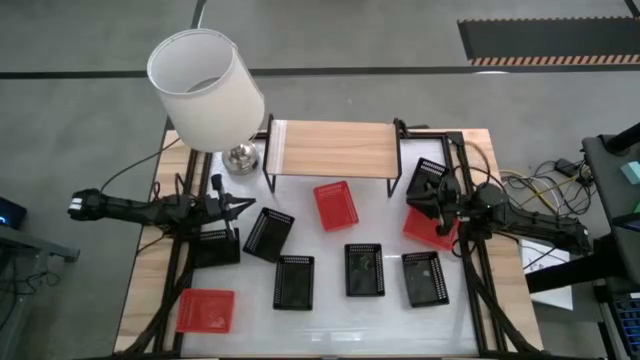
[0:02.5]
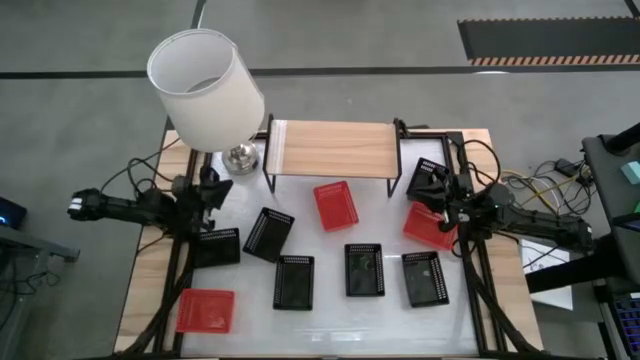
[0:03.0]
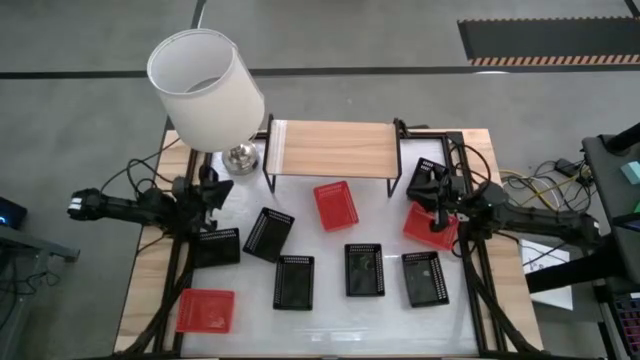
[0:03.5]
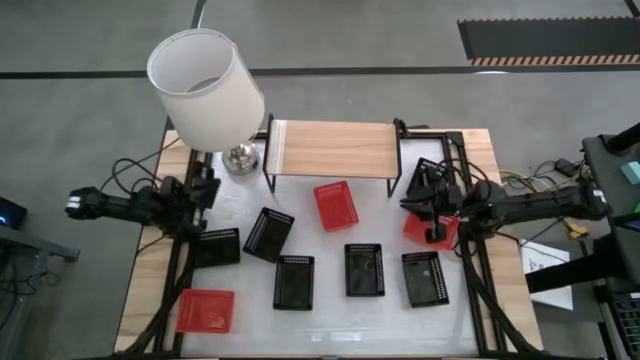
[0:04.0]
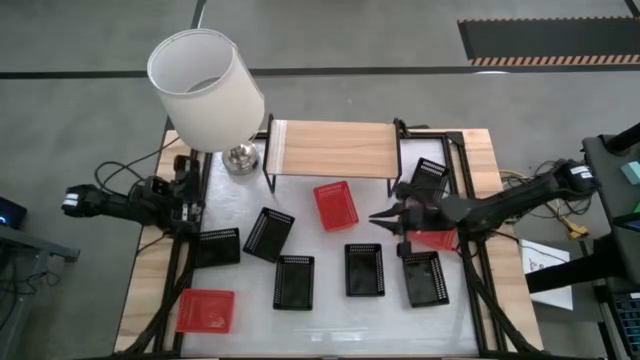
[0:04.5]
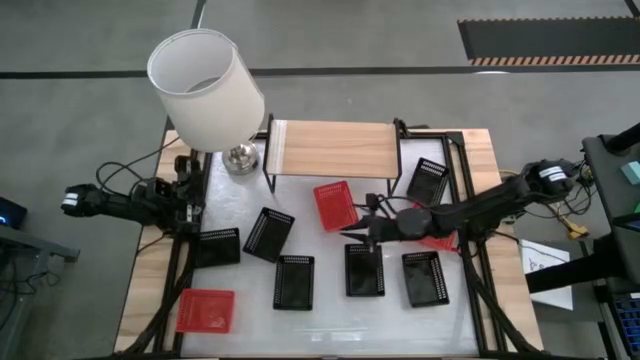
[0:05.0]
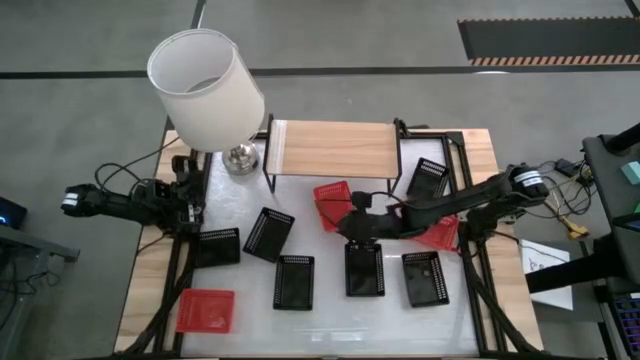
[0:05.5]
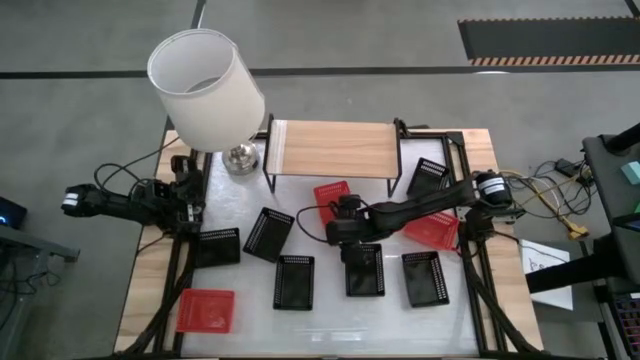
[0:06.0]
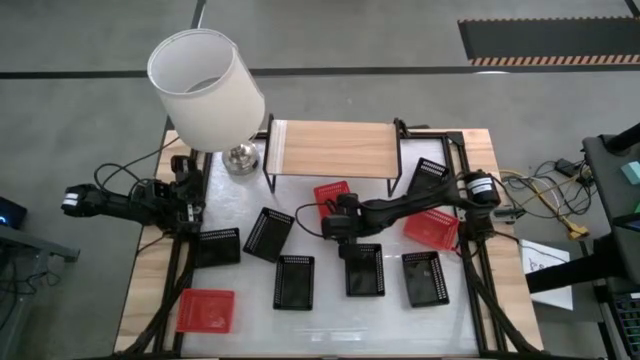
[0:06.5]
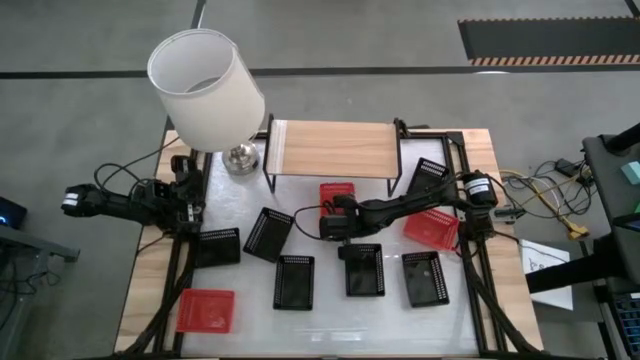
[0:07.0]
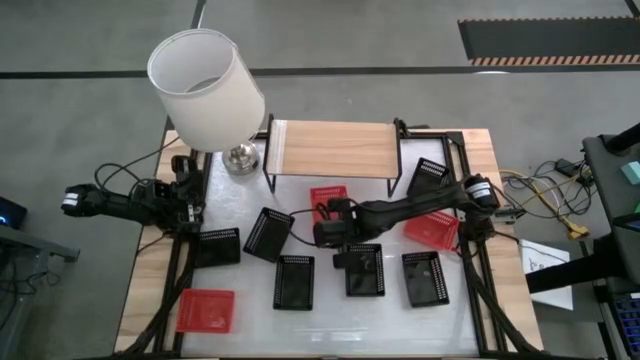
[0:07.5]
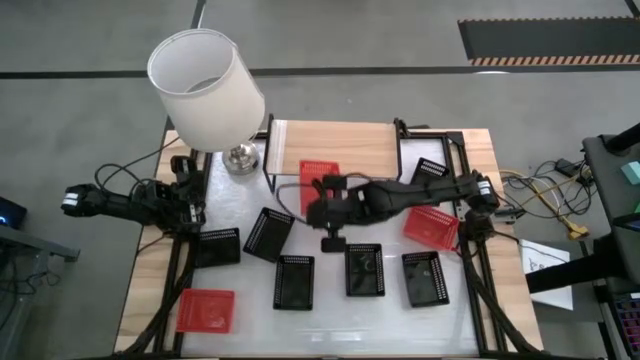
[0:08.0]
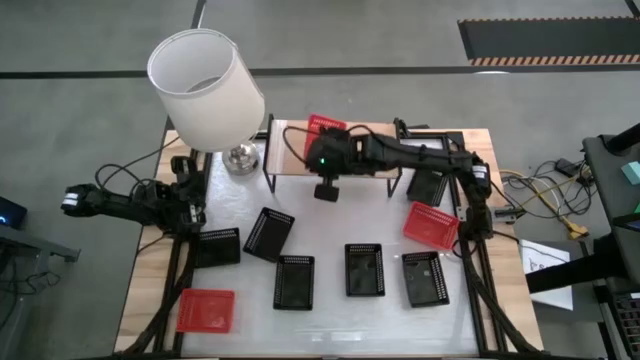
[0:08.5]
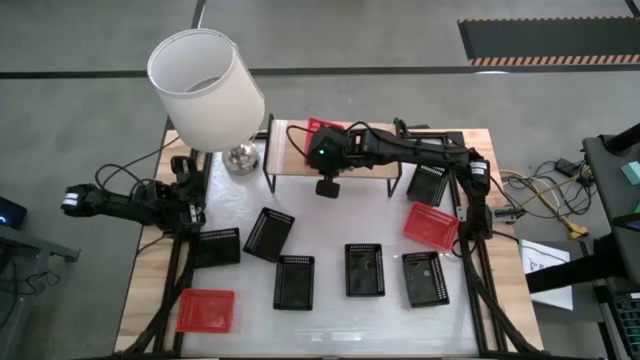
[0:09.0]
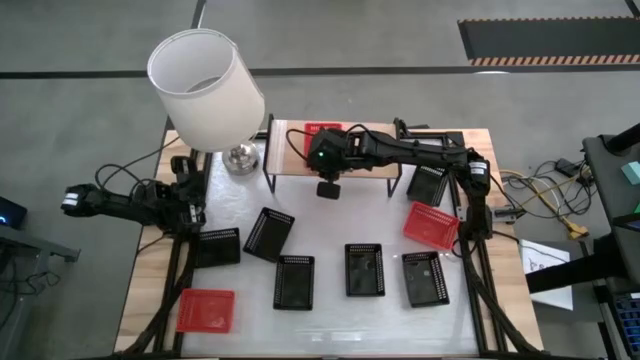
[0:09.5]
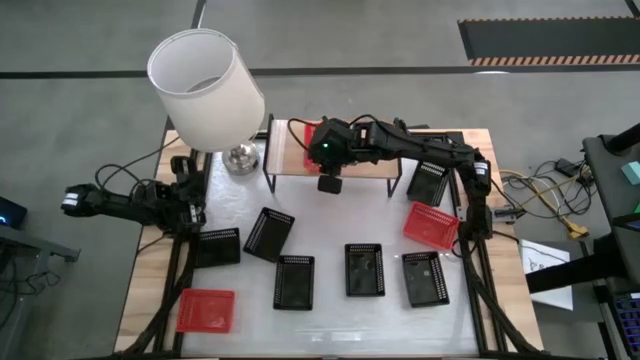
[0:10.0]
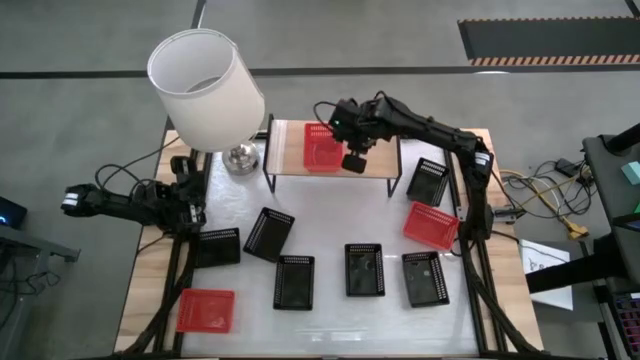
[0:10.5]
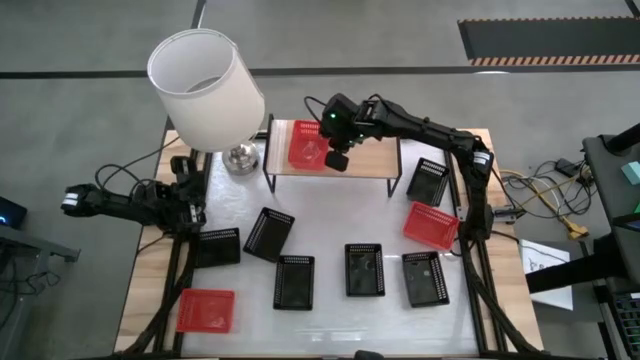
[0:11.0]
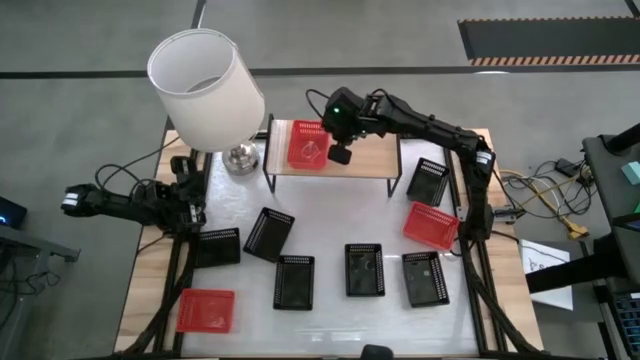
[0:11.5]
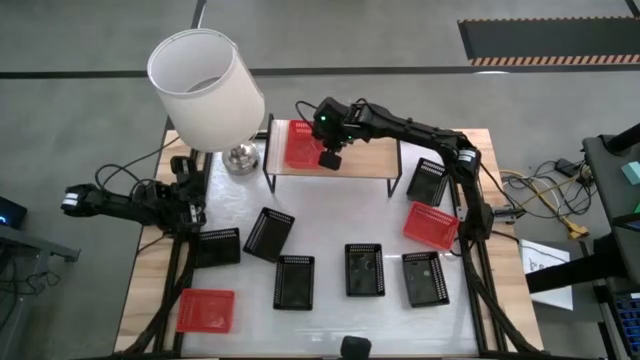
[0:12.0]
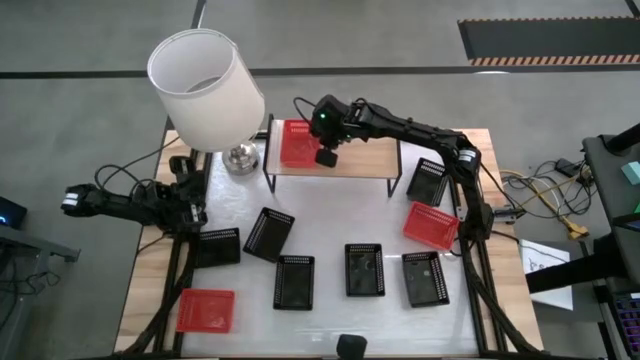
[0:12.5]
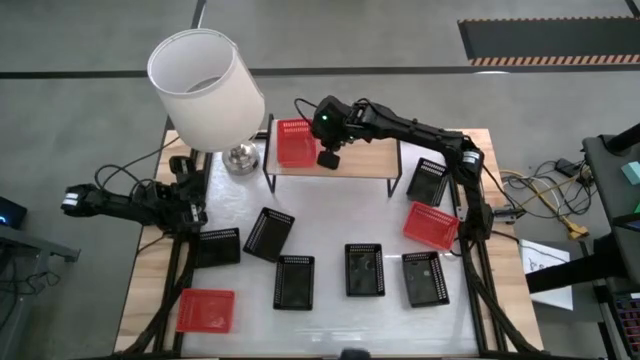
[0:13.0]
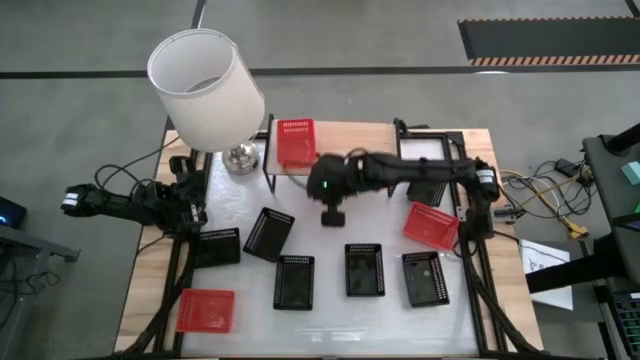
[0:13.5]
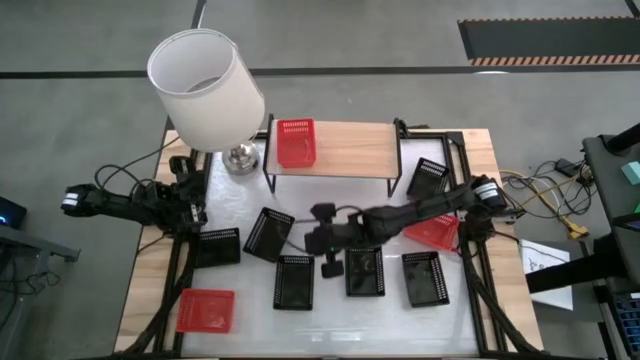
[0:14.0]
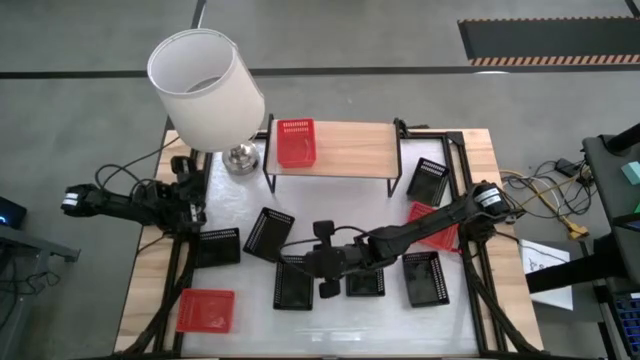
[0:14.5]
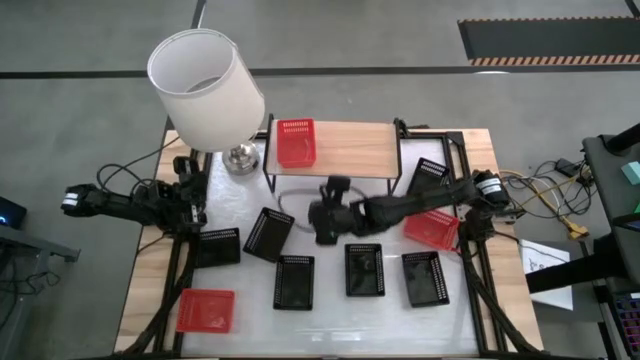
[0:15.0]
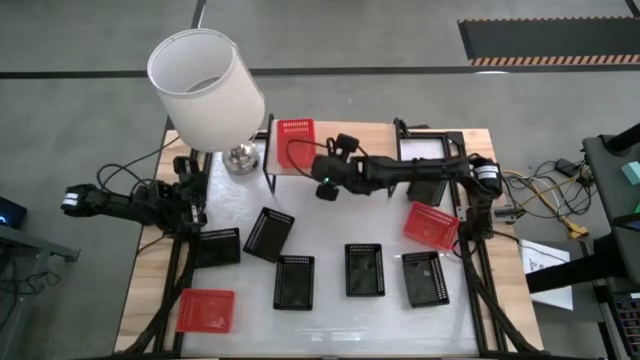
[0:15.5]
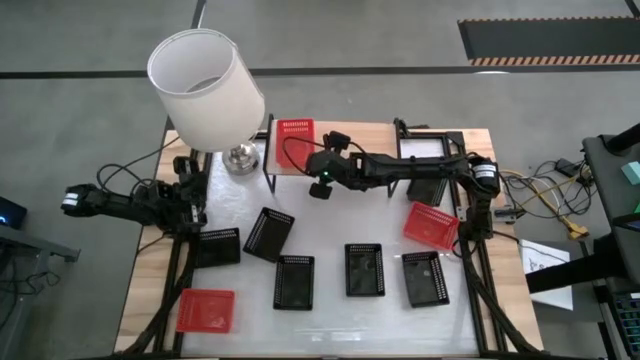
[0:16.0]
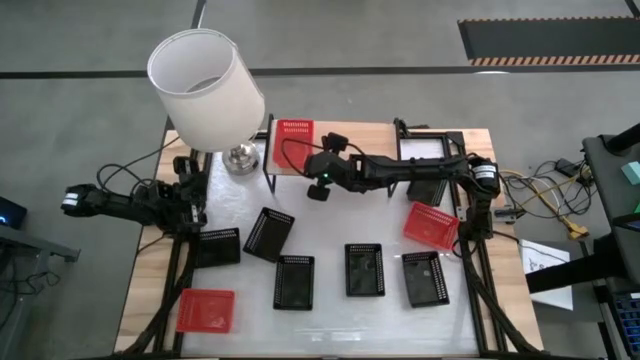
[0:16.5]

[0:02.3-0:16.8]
Put the top middle red basket on the shelf

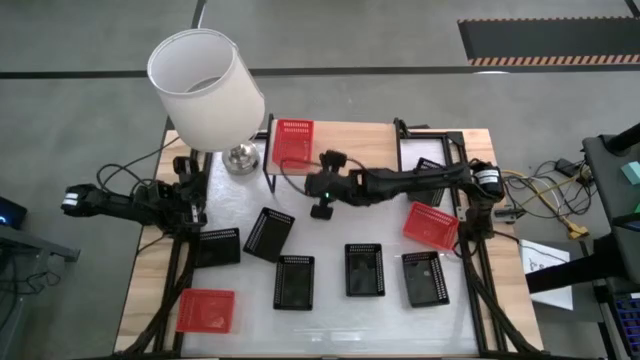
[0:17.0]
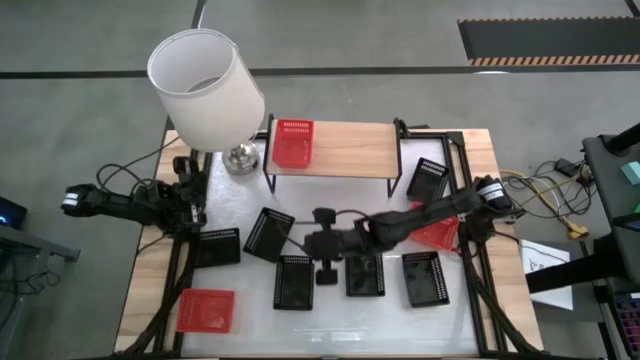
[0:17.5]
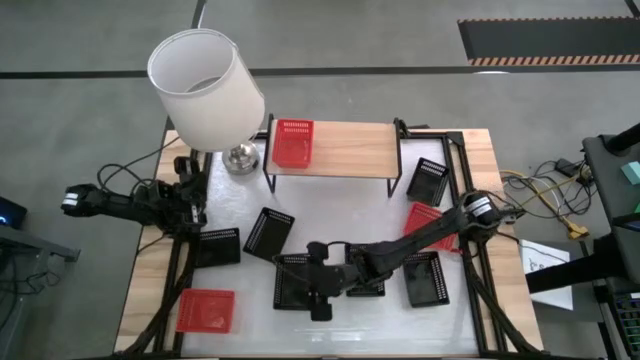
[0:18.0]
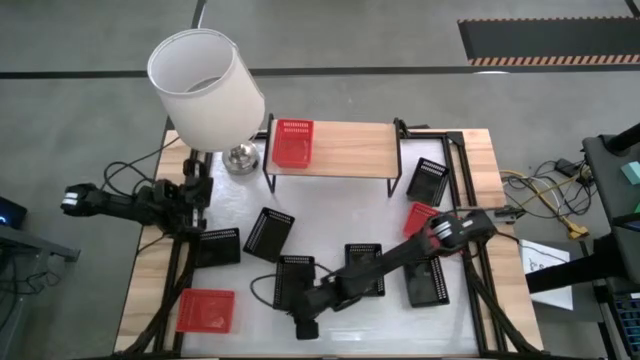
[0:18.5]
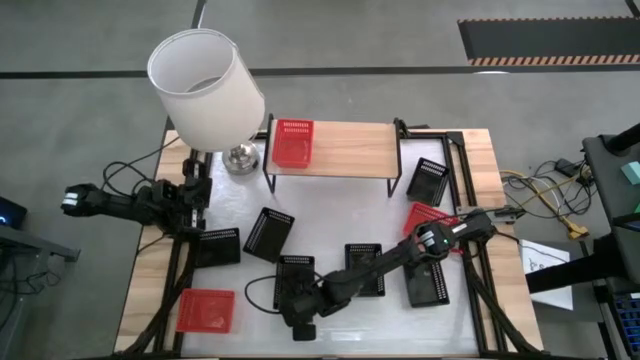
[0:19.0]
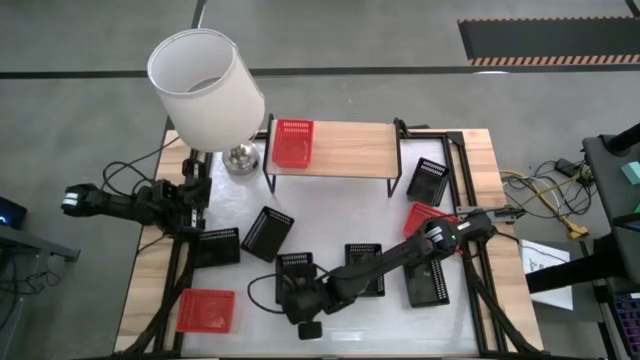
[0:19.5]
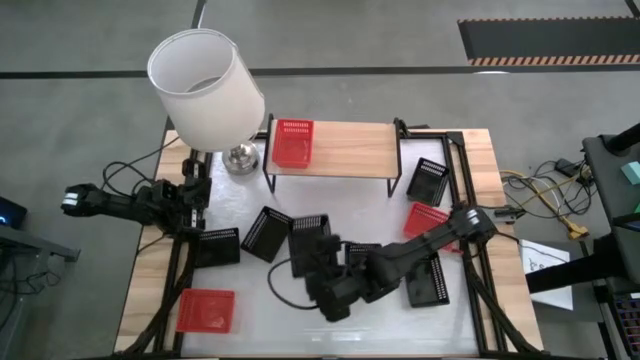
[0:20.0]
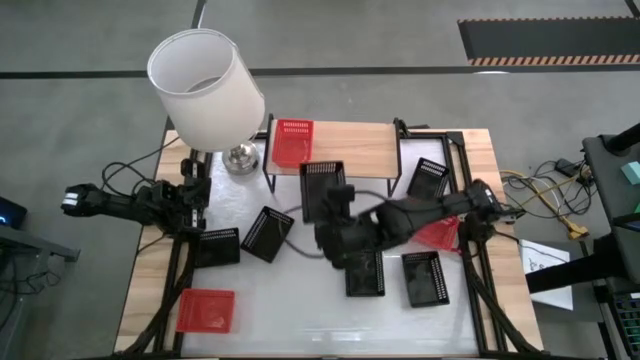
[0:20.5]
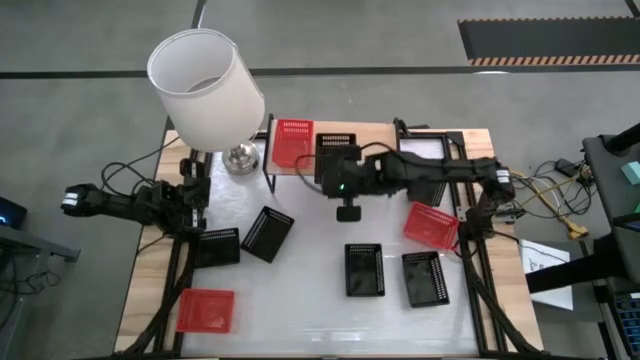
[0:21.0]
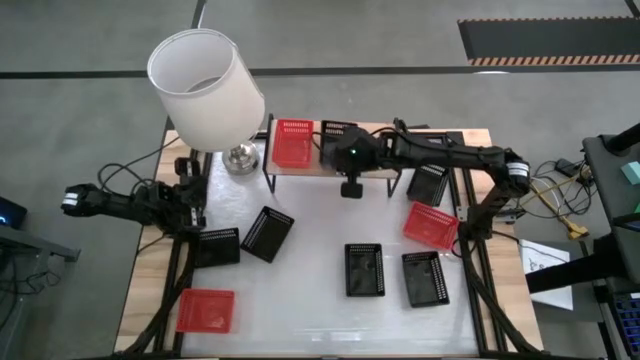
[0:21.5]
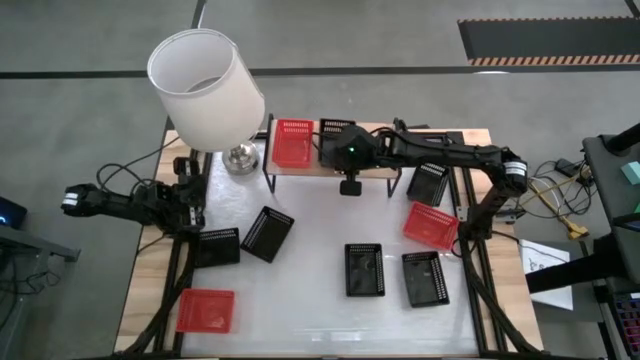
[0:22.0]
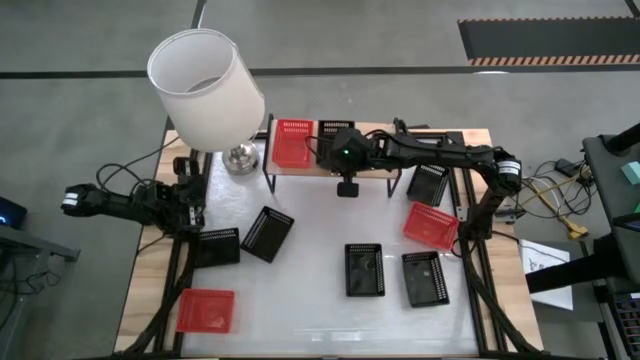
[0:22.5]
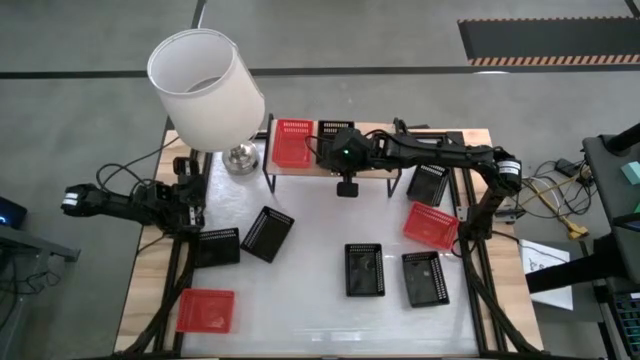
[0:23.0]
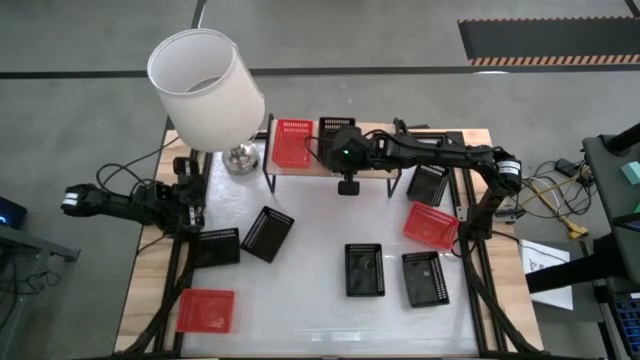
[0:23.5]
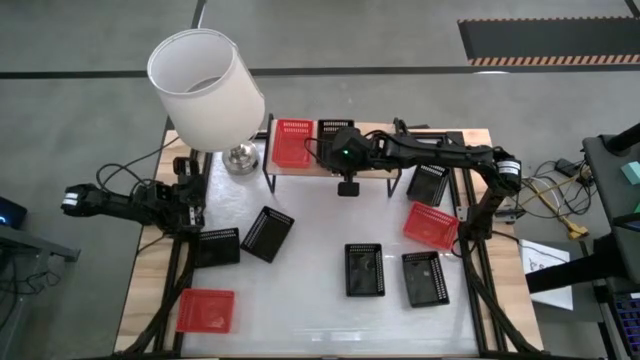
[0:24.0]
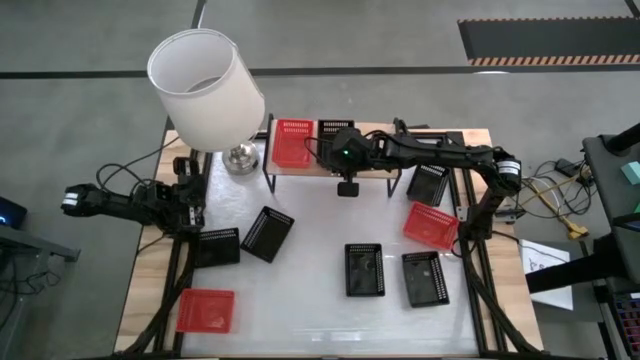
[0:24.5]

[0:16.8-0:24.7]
Put the black basket on the shelf
